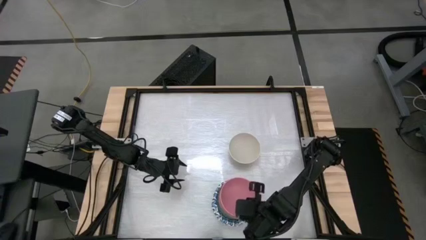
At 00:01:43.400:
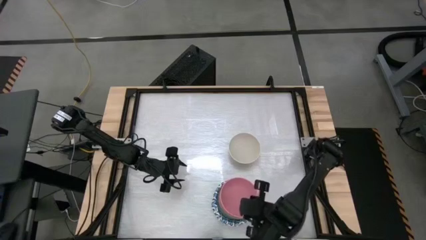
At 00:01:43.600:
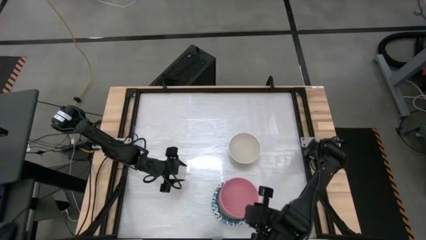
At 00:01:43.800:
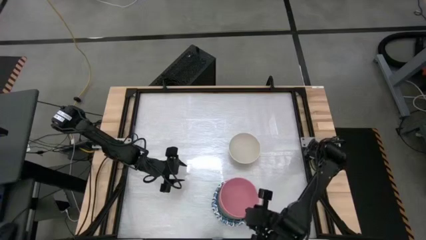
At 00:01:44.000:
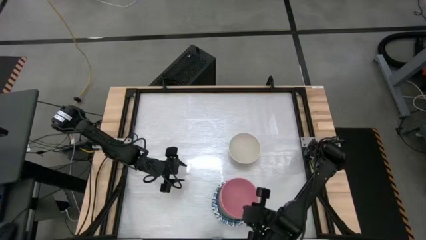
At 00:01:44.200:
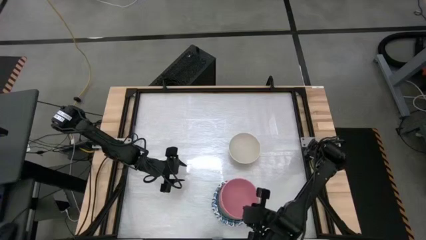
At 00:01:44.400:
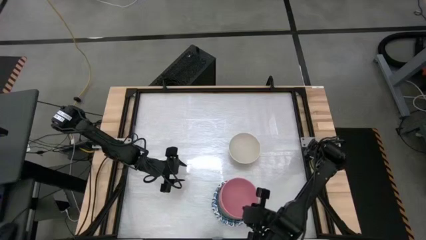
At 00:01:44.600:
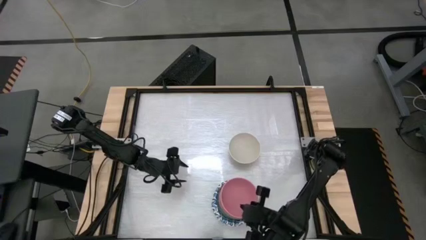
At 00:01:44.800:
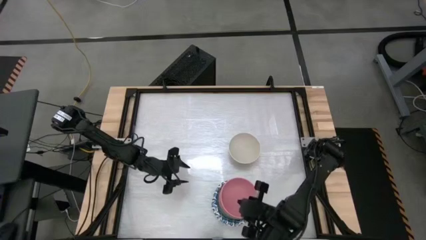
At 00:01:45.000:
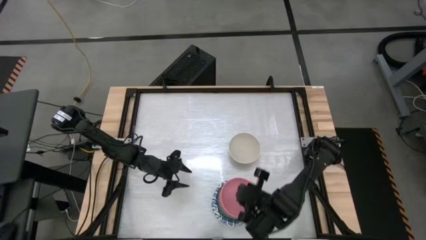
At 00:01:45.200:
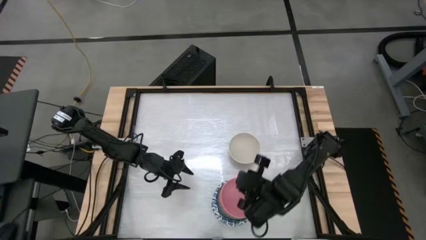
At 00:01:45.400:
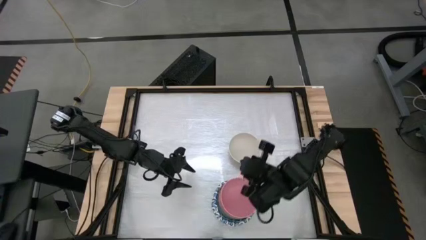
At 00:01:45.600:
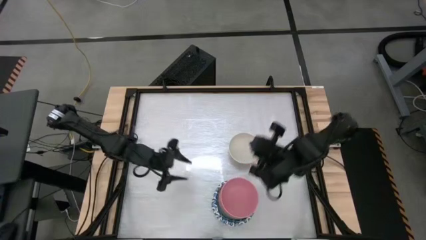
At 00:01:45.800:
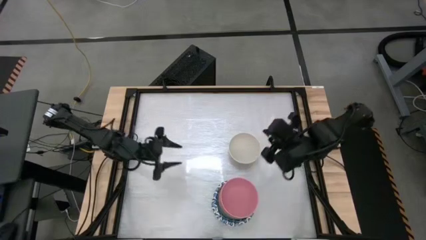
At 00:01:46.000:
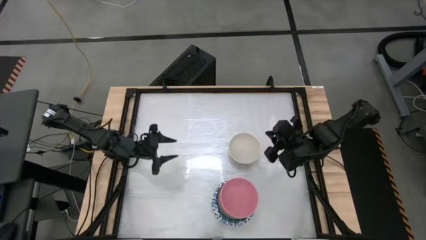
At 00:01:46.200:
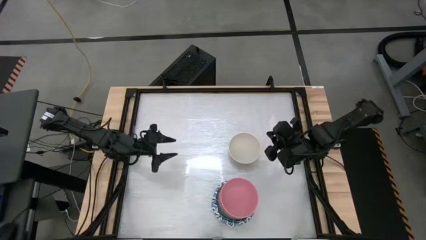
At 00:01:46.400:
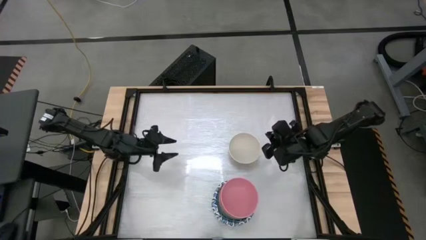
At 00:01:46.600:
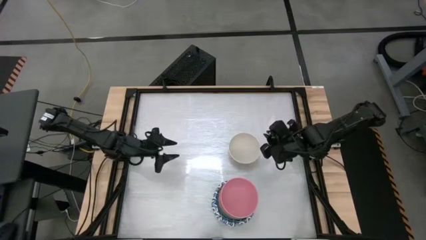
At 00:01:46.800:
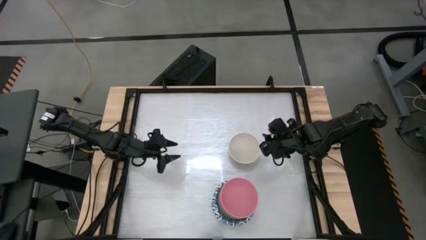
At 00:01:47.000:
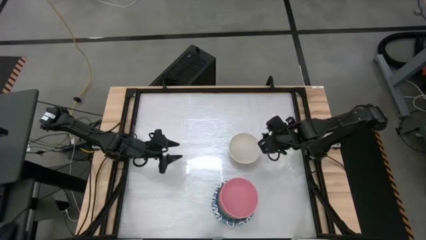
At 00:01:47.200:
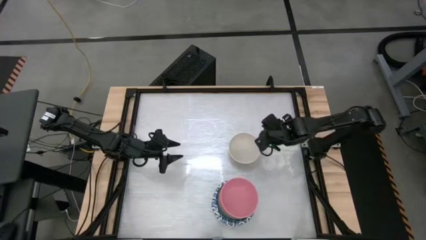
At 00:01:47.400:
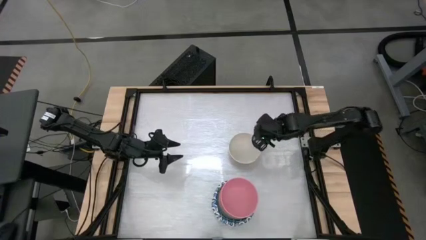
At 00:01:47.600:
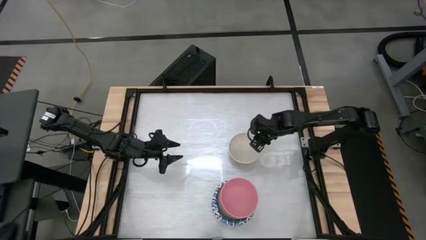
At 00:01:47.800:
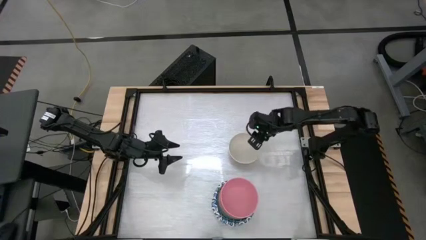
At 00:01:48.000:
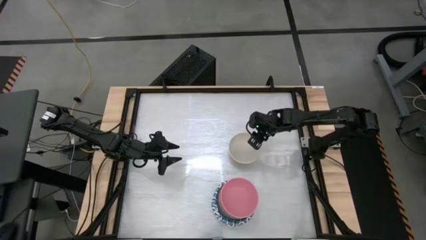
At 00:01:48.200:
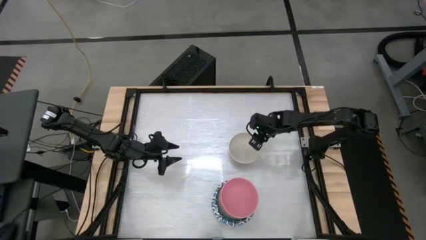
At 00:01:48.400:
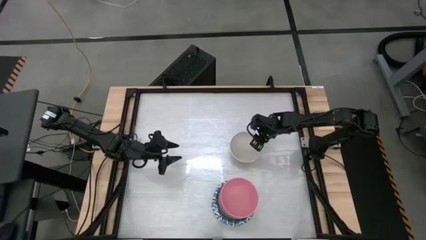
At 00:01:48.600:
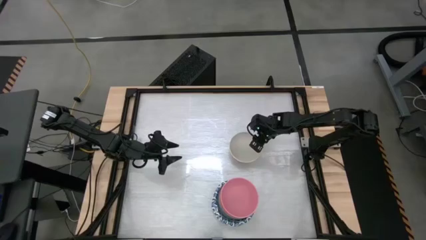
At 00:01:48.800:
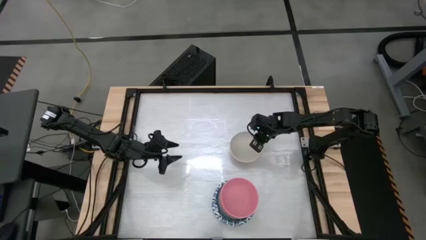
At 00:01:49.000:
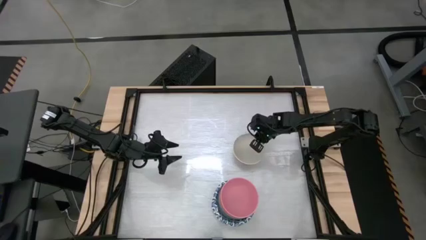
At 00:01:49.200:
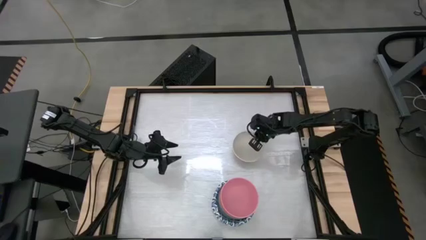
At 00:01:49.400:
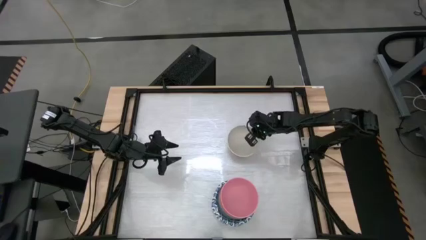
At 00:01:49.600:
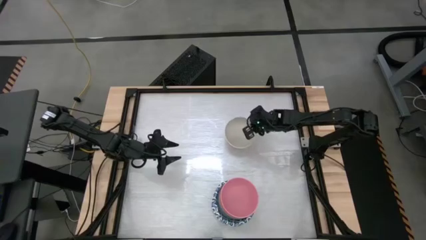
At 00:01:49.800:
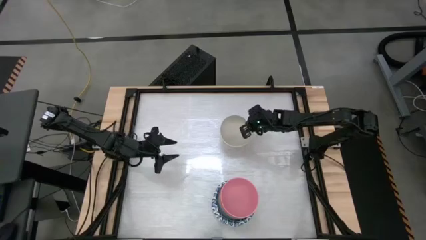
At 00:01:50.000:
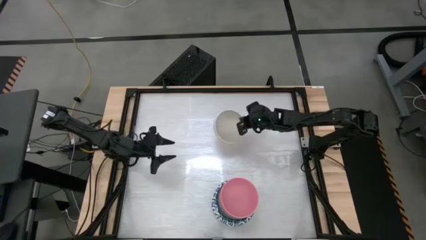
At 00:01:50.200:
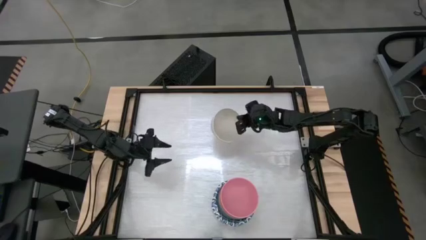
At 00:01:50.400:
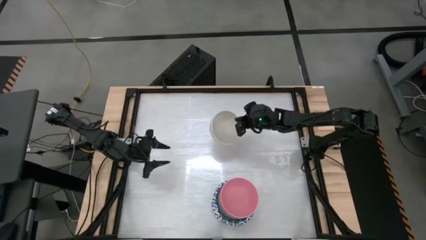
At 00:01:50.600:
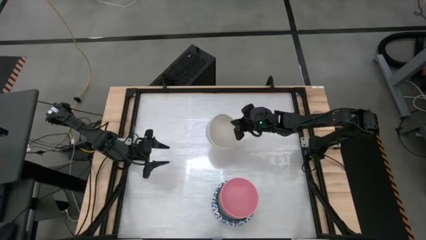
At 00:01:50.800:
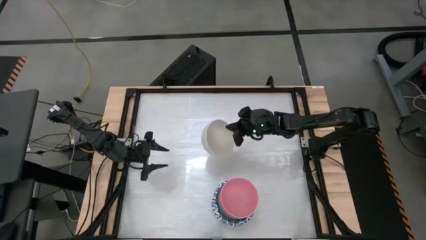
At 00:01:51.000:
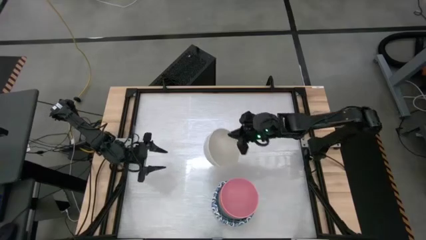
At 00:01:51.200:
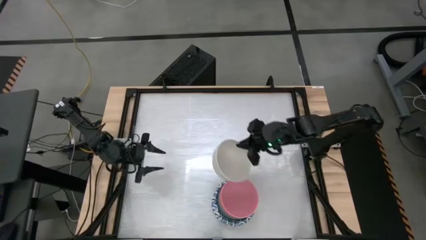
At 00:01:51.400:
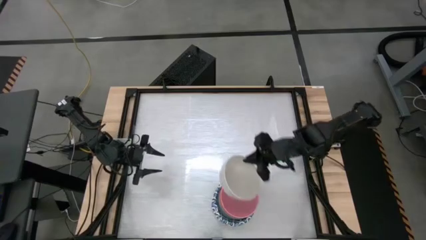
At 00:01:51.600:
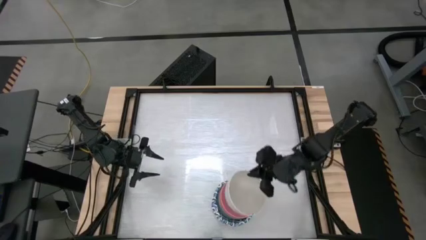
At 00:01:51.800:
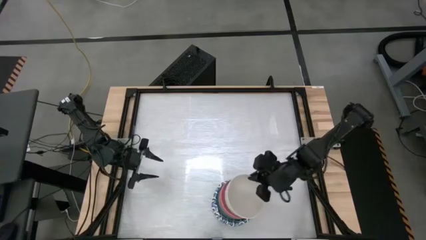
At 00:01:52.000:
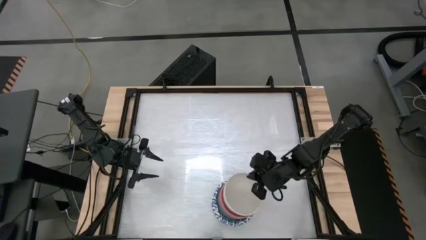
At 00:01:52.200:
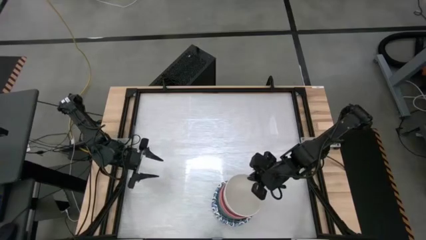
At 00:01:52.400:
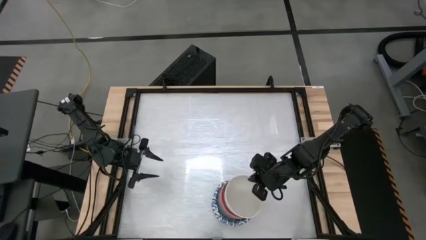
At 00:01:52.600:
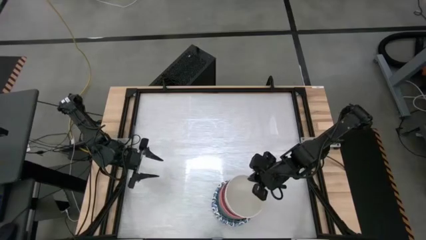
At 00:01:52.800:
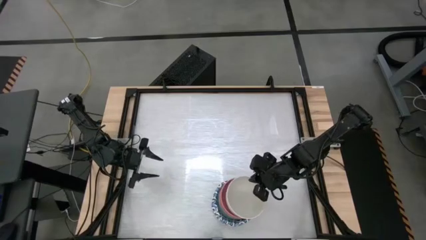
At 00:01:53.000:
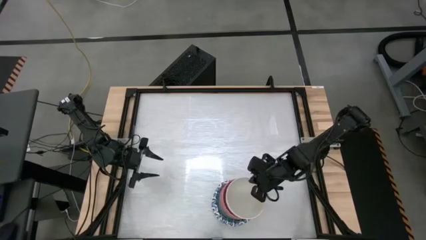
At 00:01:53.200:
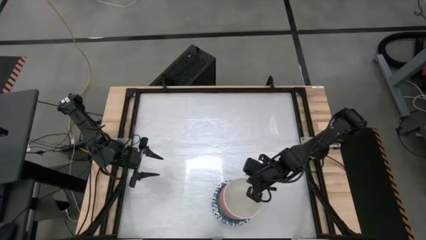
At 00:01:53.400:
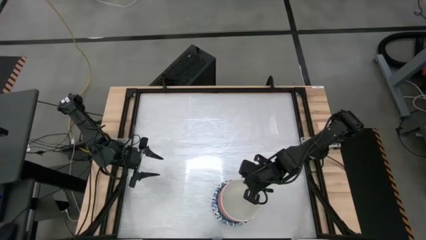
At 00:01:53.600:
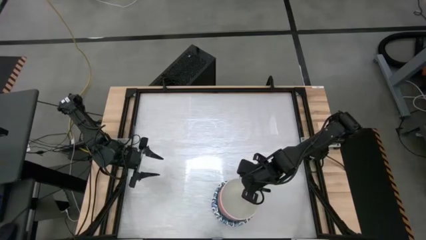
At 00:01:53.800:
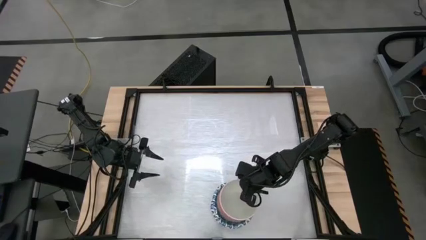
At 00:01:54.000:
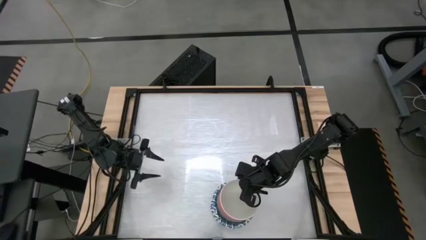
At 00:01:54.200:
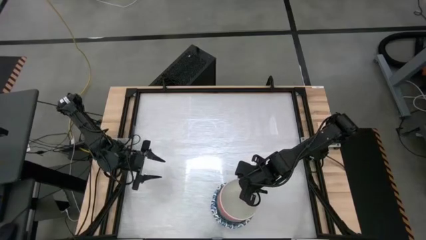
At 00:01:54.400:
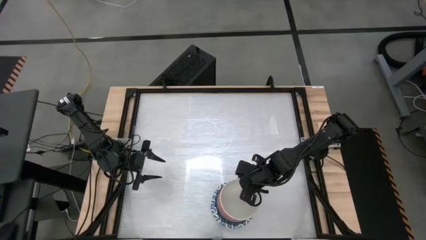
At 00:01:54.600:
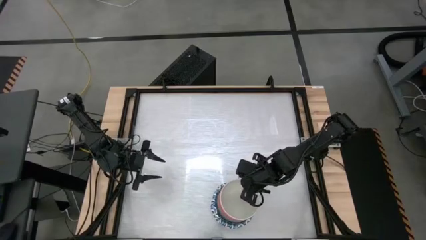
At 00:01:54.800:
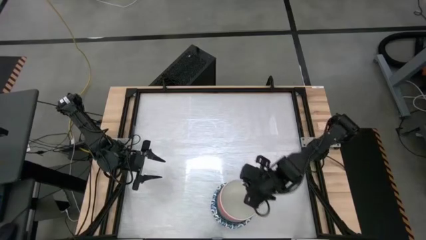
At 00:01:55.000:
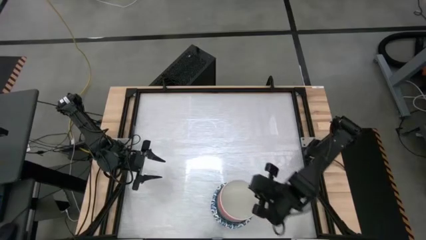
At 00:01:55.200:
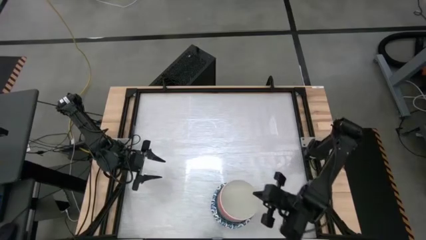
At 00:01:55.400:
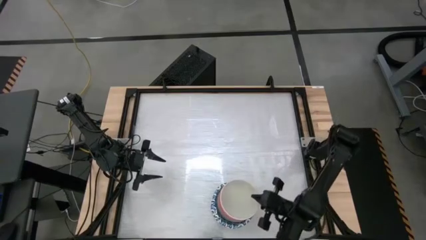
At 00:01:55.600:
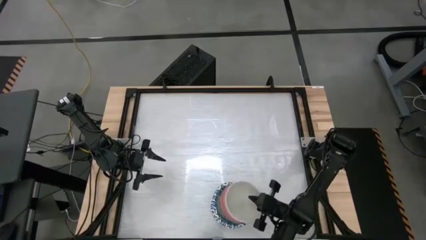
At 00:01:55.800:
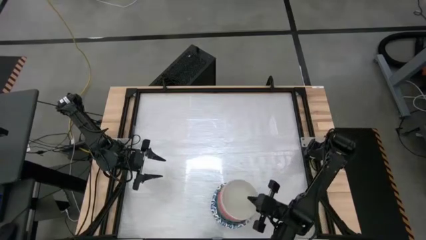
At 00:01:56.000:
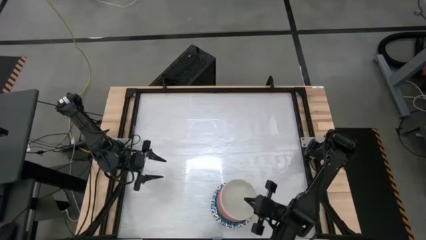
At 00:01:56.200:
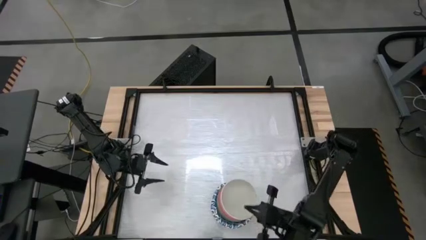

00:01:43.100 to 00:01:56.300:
Stack the white bowl into the pink bowl

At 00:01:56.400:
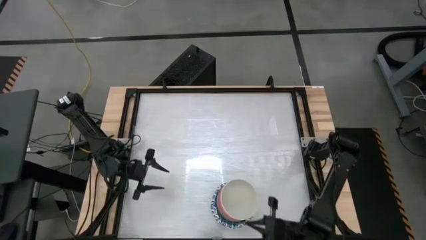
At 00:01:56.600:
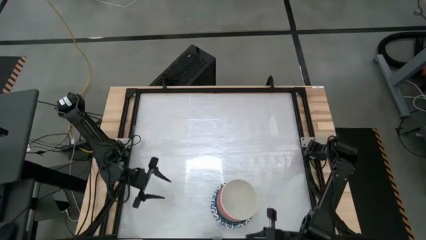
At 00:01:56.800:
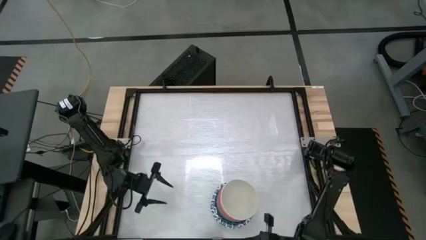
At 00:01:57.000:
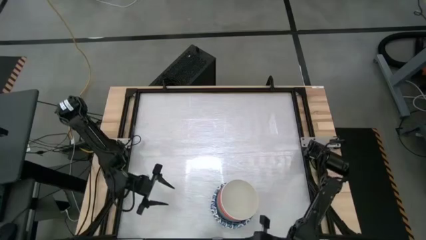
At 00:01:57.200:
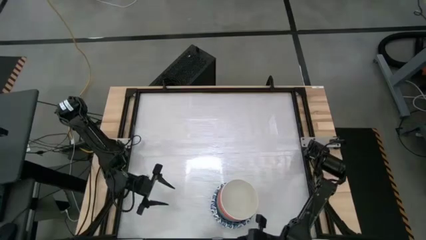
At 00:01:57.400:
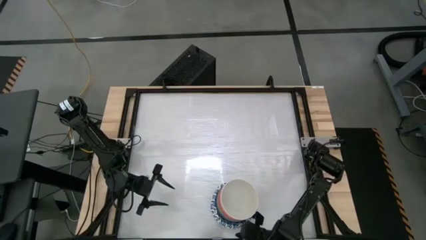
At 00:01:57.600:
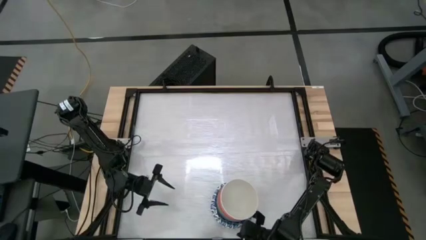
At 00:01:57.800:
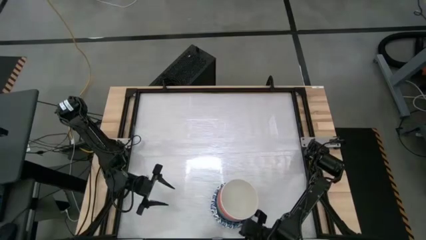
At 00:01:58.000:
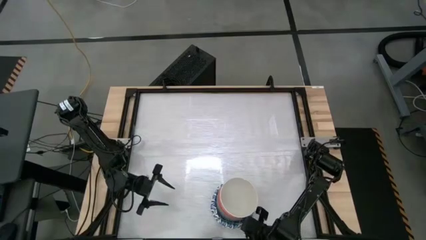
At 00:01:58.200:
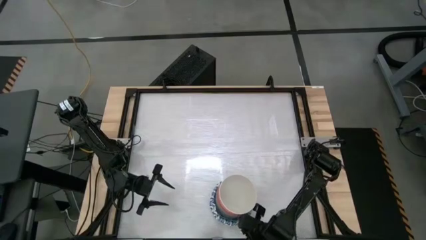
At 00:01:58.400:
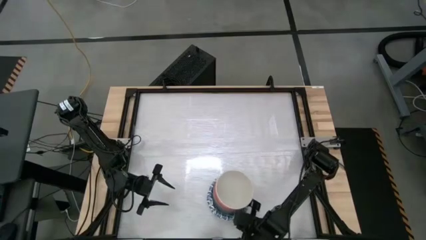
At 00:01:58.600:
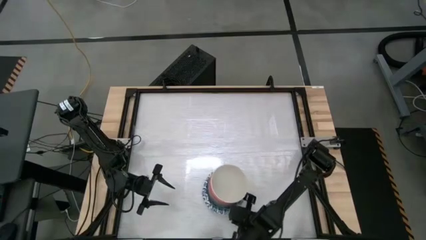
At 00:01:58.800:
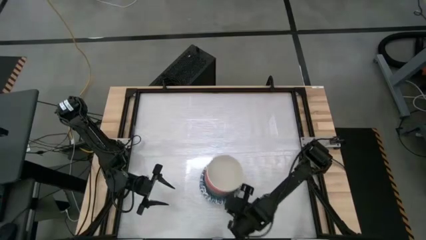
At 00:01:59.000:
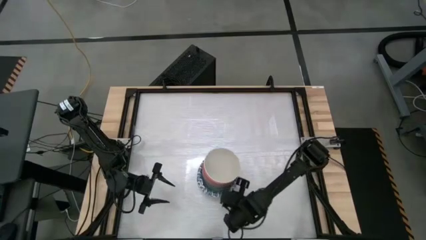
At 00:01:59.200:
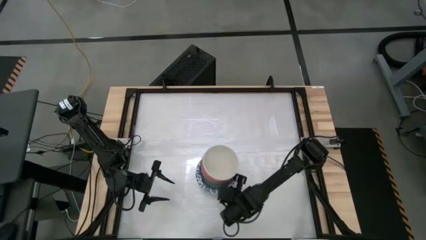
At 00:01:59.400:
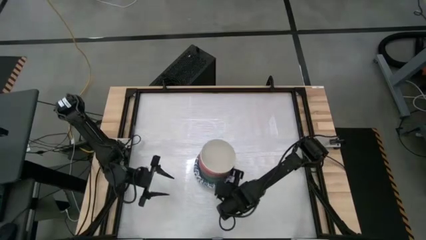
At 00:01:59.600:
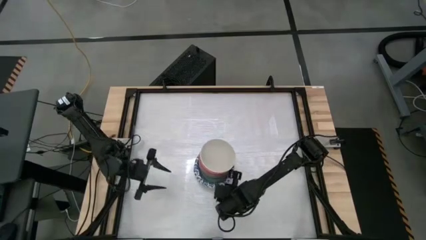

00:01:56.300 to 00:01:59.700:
Move the stacked bowls to the center of the table
